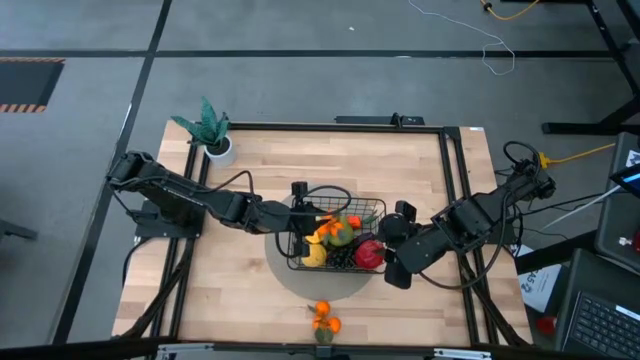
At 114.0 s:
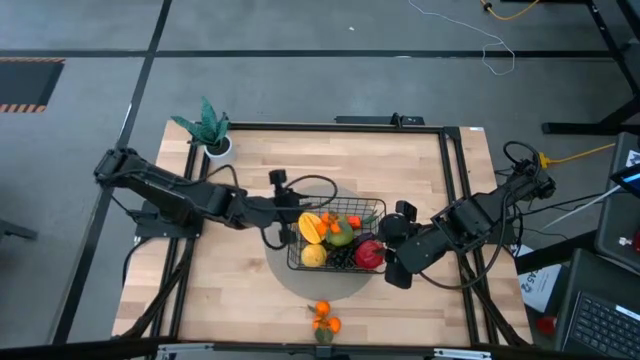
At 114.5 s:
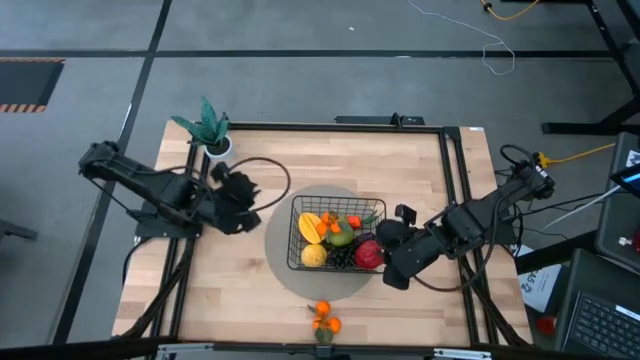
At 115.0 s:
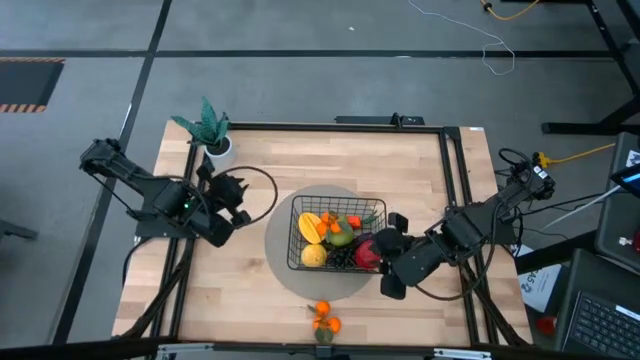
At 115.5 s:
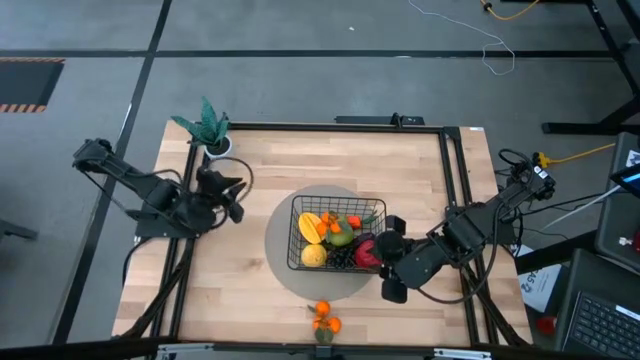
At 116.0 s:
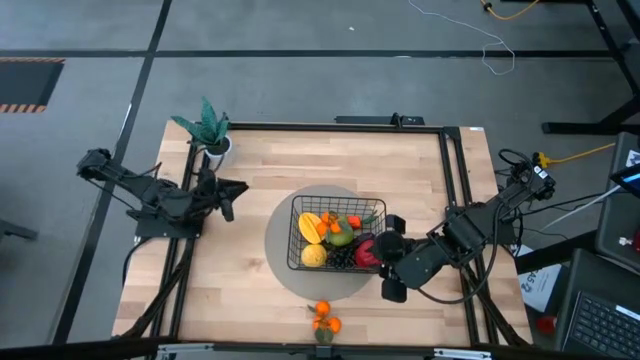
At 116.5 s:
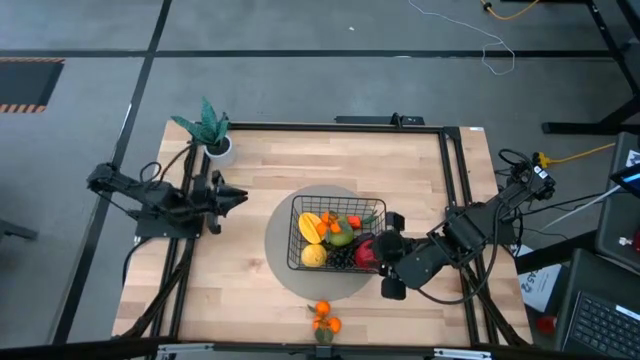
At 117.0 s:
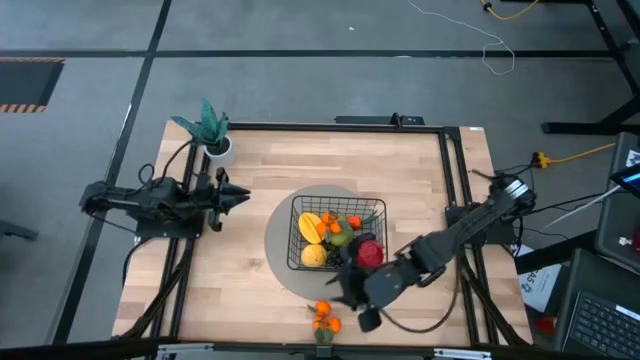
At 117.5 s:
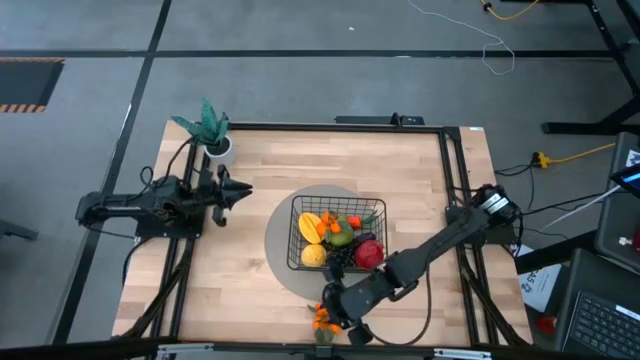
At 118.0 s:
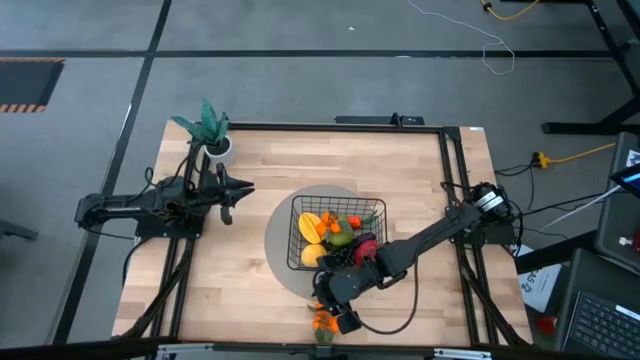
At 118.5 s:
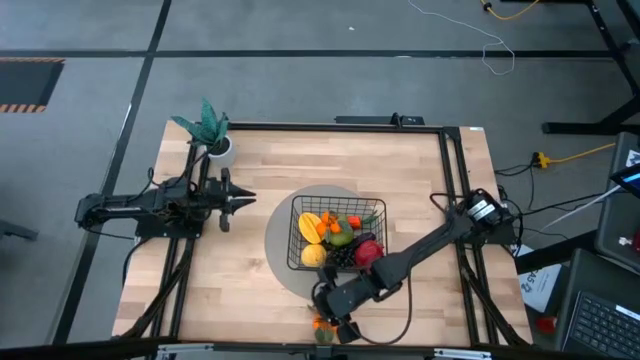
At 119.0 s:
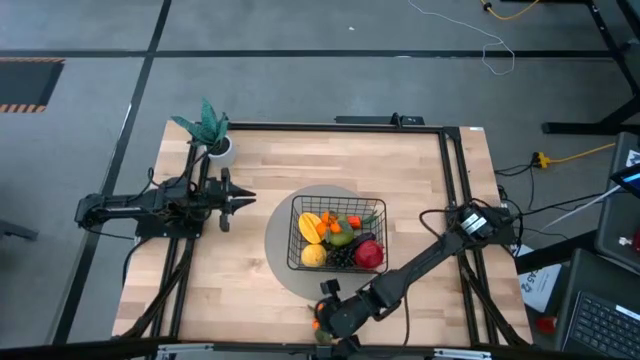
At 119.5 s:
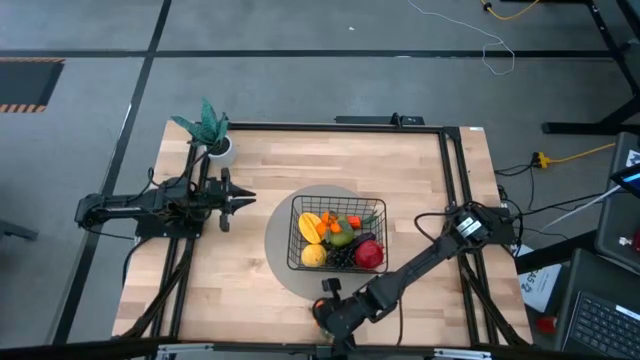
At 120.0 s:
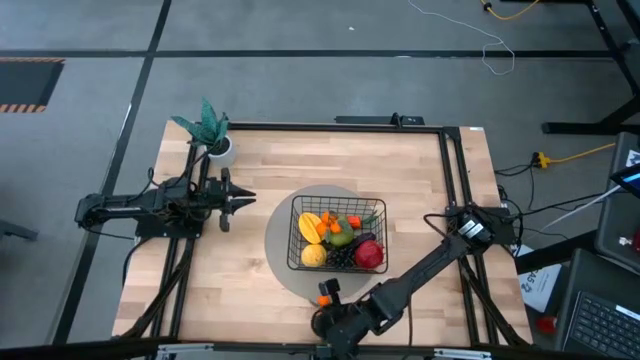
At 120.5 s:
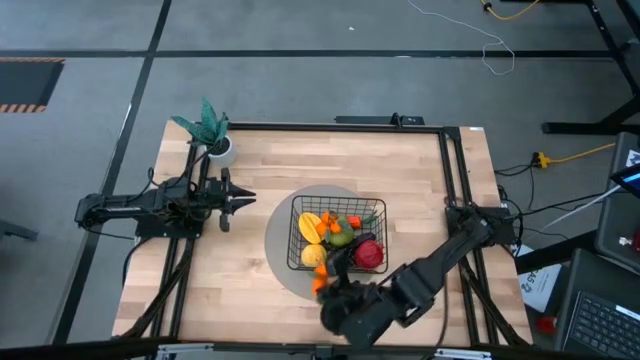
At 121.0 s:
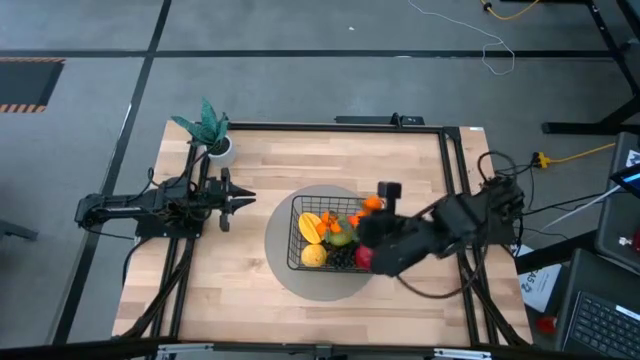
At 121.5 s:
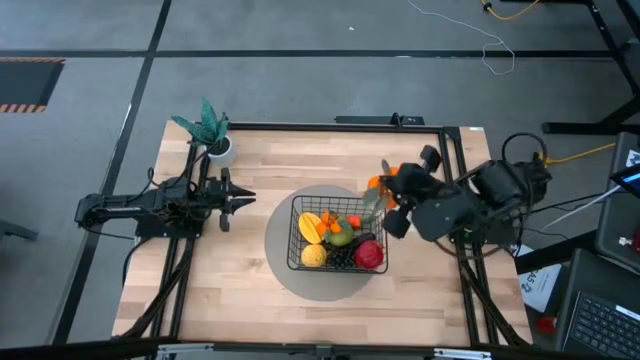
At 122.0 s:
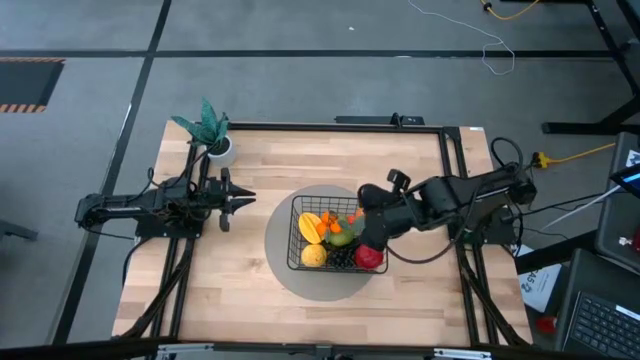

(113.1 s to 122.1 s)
Task: Build produce basket
Put the orange tangerine into the wire basket

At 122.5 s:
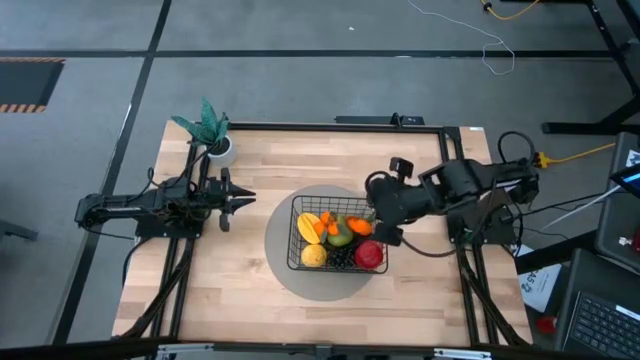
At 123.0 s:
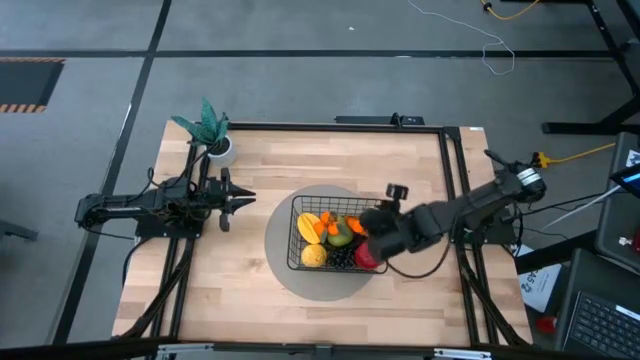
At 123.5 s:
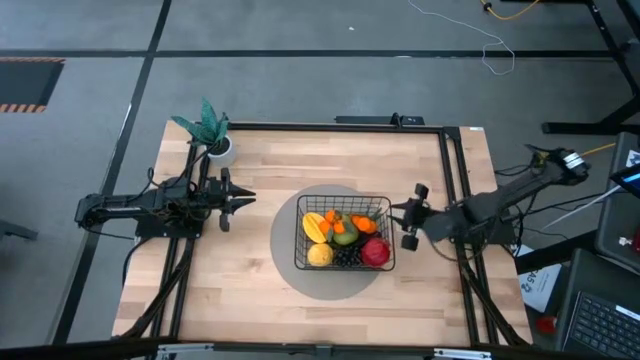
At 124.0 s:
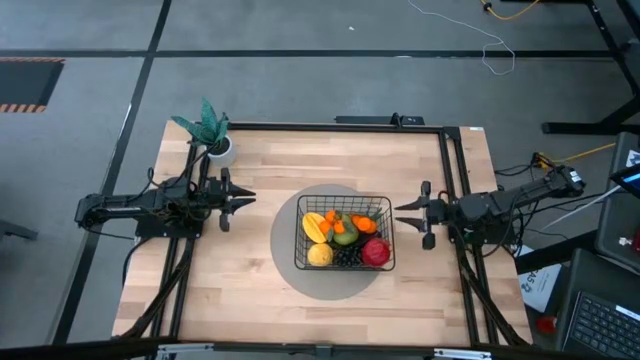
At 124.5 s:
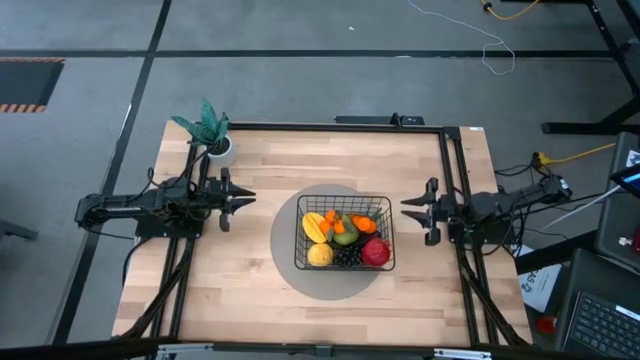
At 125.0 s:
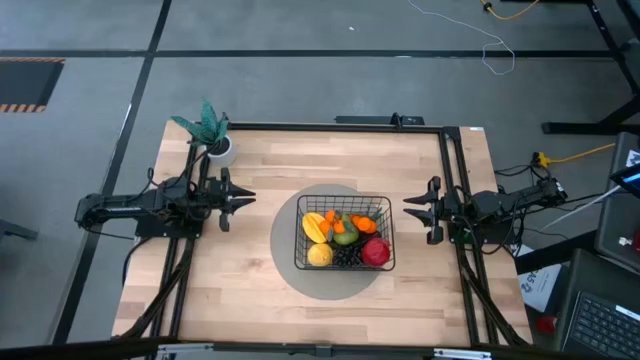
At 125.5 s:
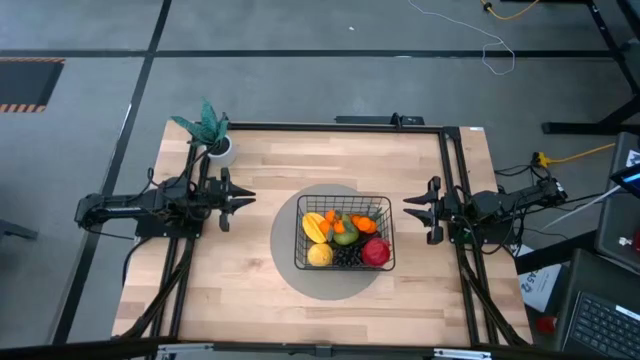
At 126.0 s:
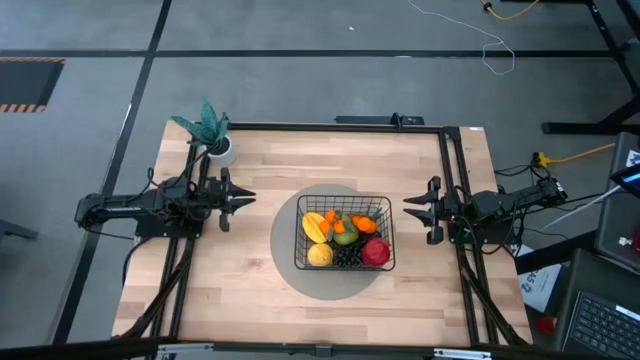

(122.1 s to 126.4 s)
Return to Home Position

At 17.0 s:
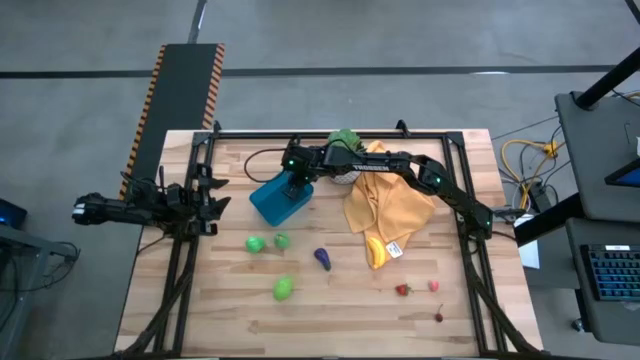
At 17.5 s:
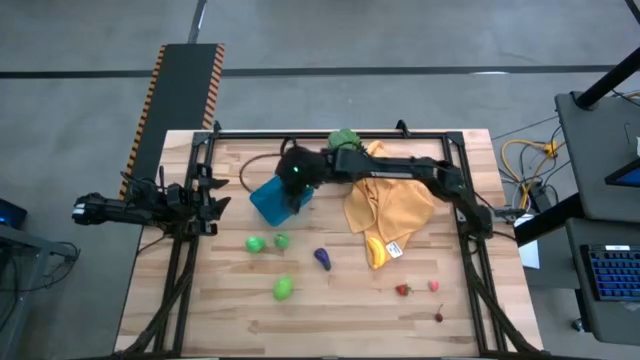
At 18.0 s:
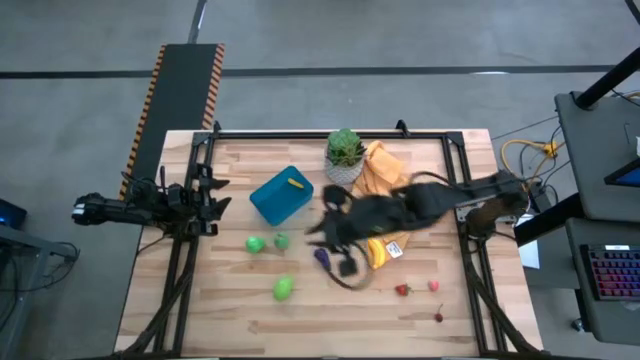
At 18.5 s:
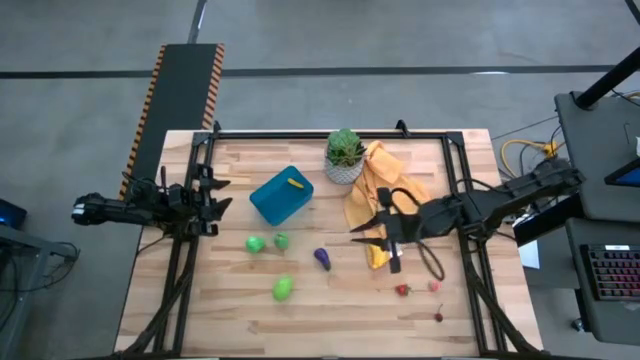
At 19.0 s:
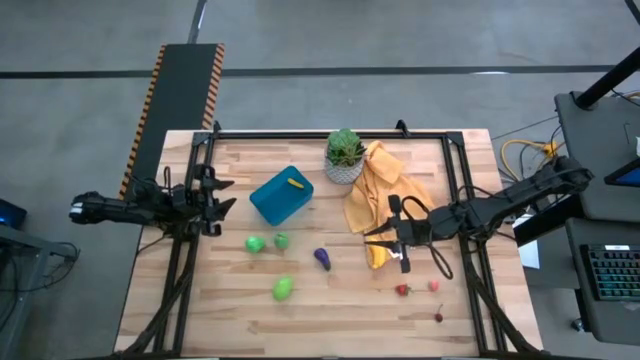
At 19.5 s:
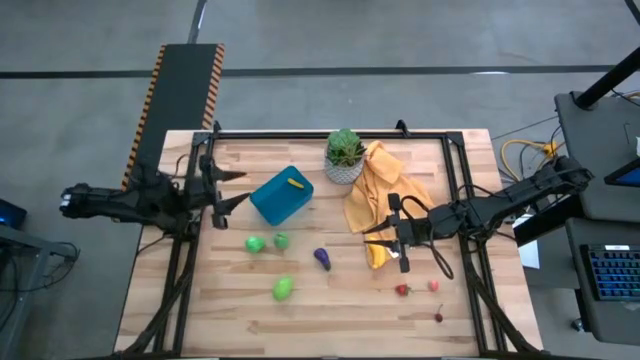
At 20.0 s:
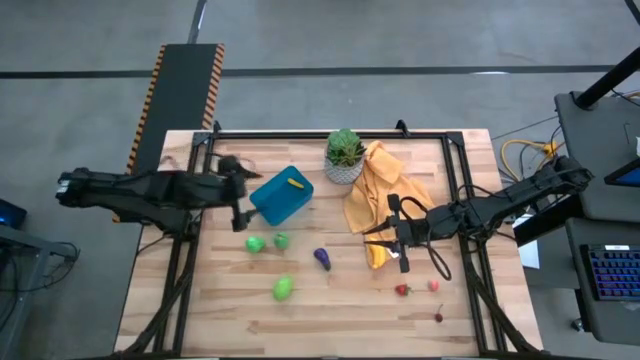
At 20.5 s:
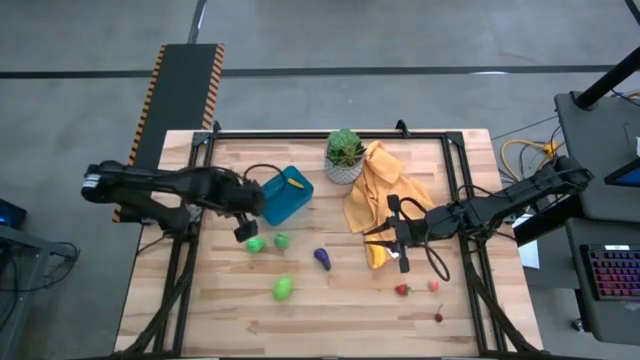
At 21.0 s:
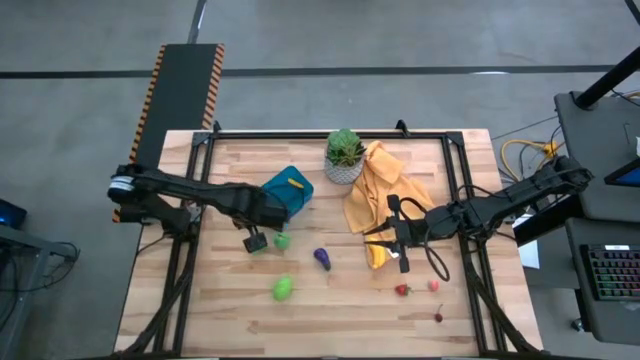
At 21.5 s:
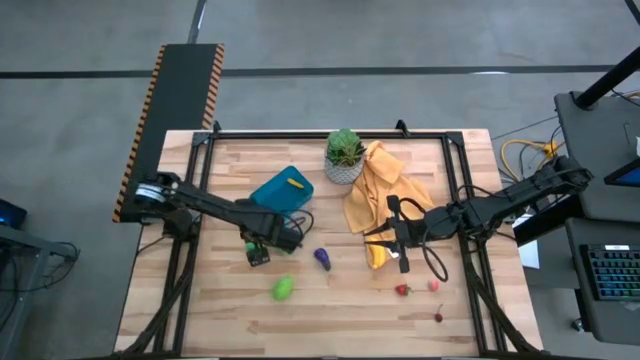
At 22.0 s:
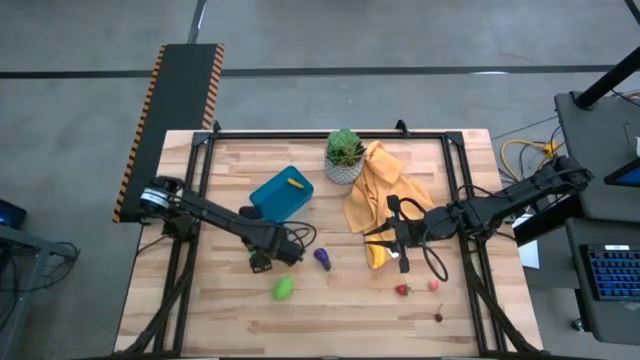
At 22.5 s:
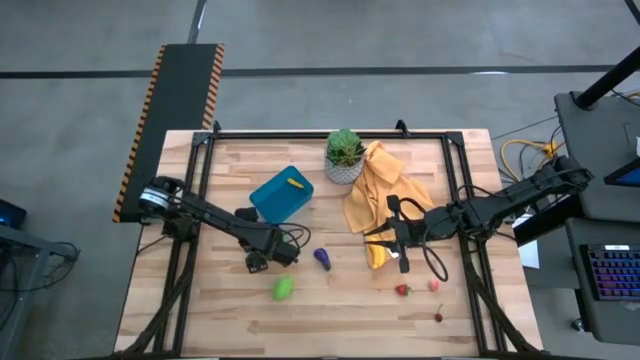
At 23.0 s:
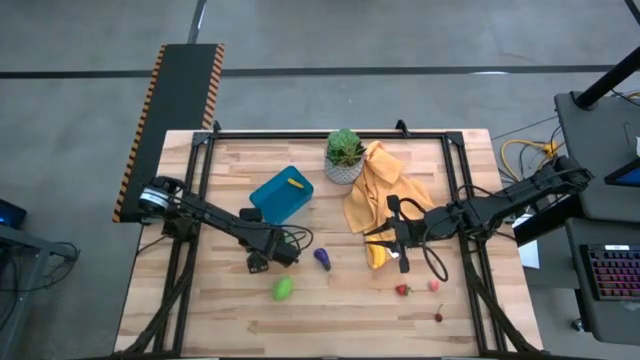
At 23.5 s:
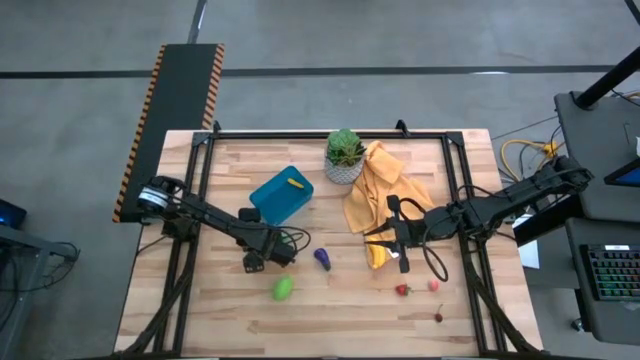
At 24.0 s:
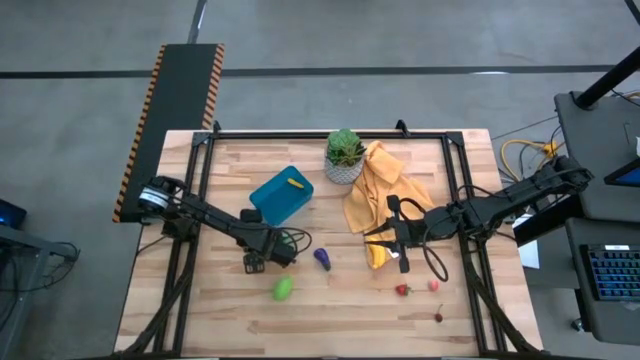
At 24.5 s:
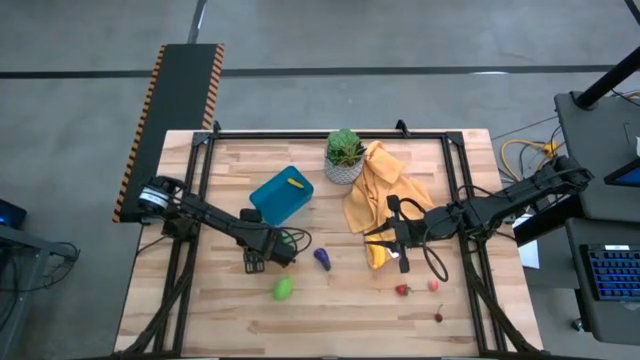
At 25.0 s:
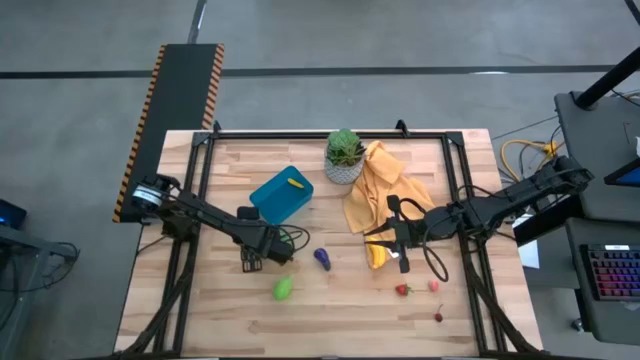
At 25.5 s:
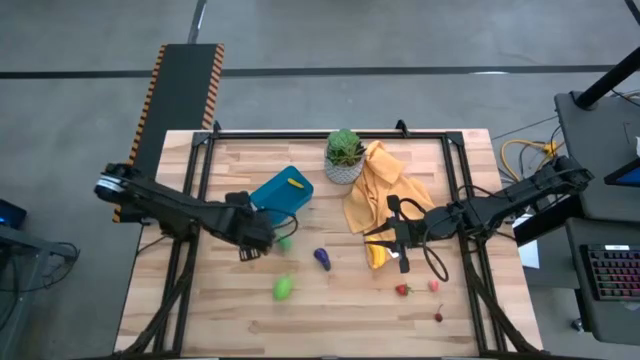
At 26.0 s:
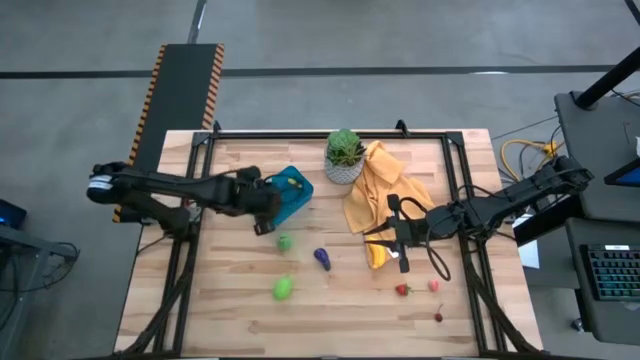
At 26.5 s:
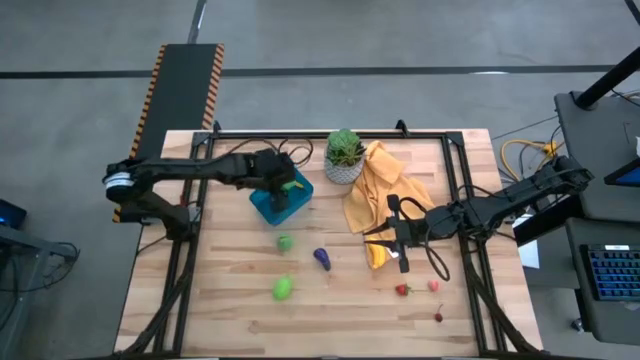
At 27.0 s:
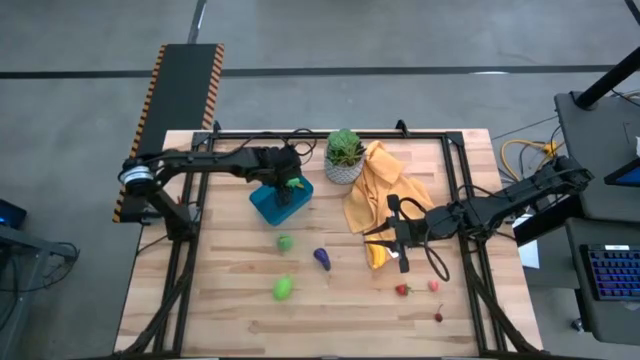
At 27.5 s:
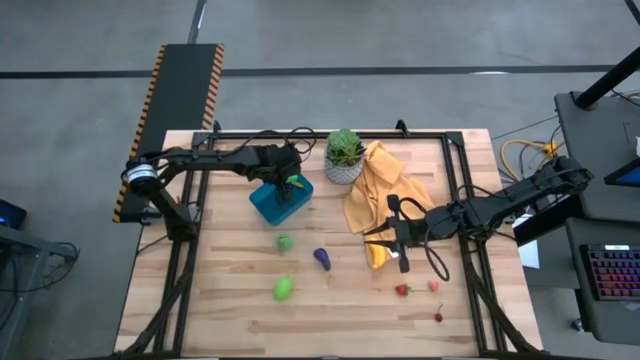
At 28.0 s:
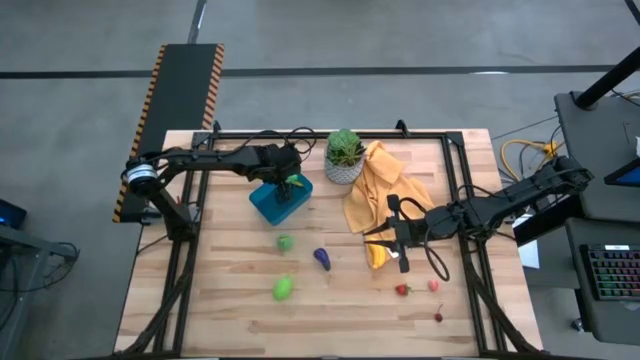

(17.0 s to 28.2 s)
Task: Pick and placing Produce into tupperware
Put the green pear into the blue bin
